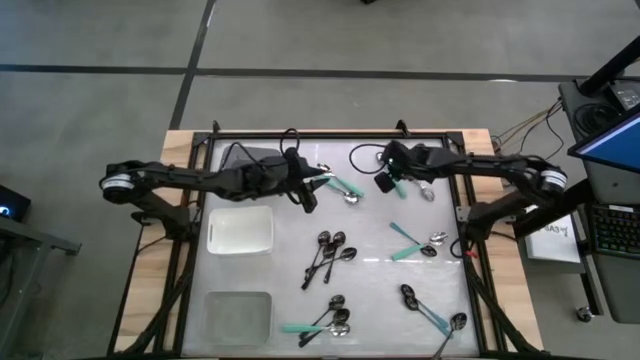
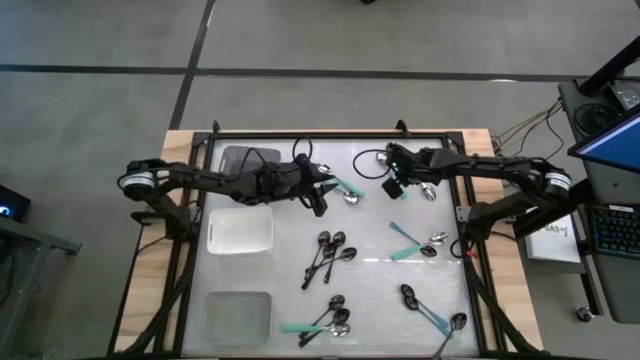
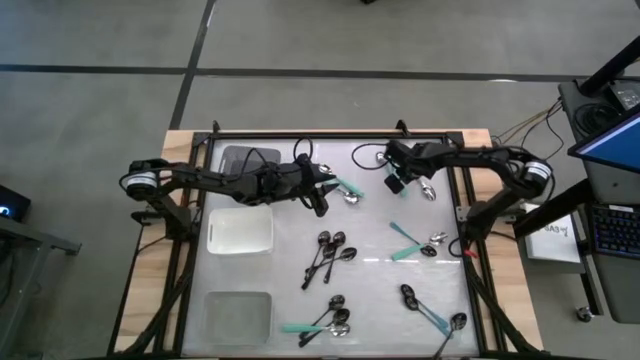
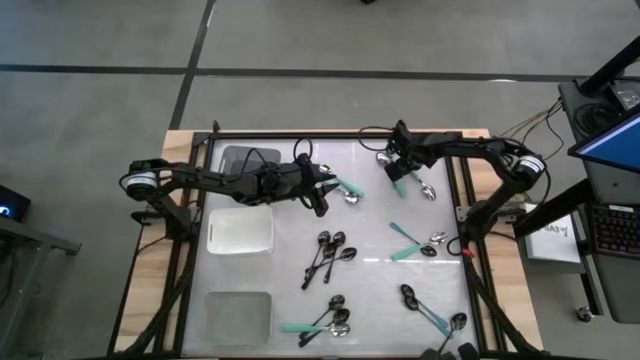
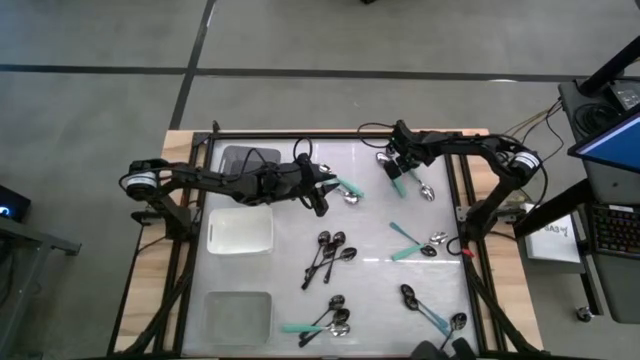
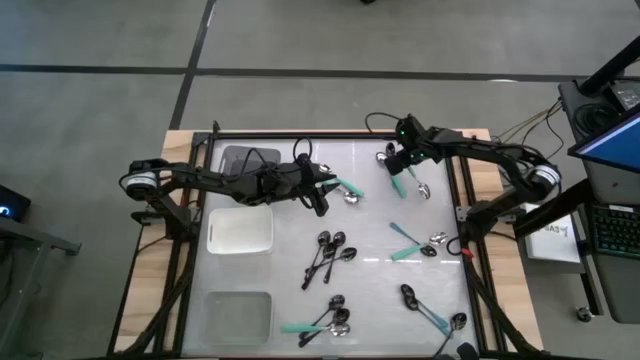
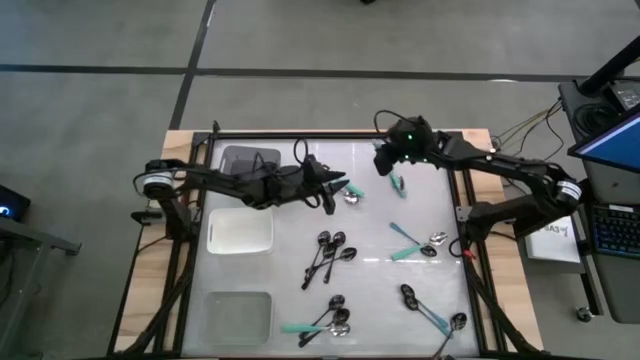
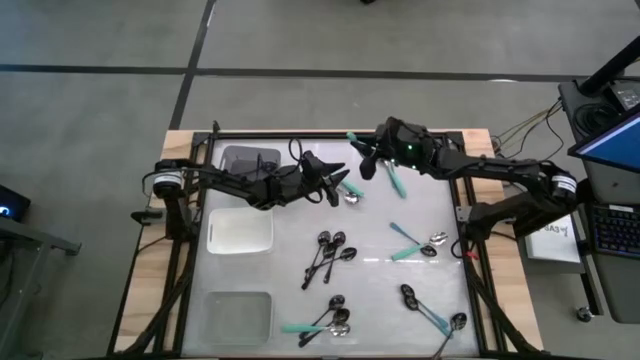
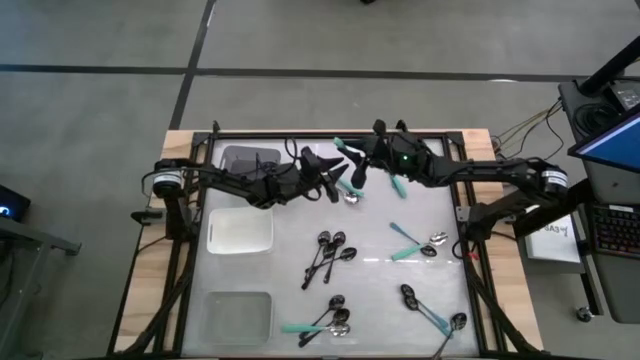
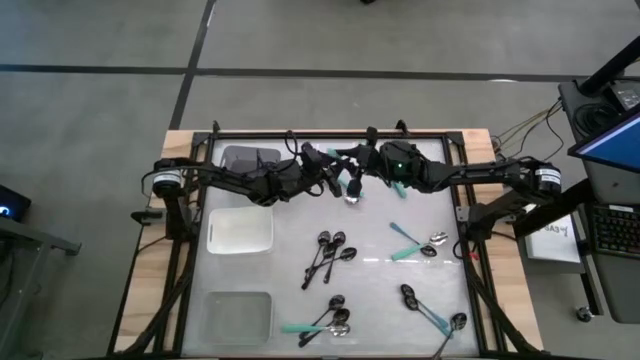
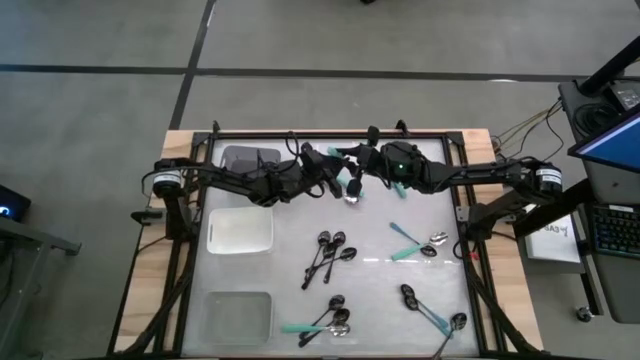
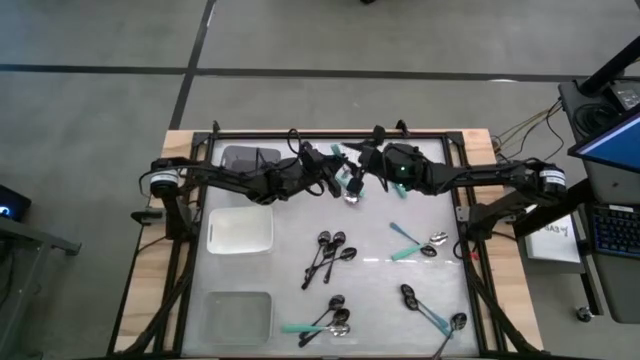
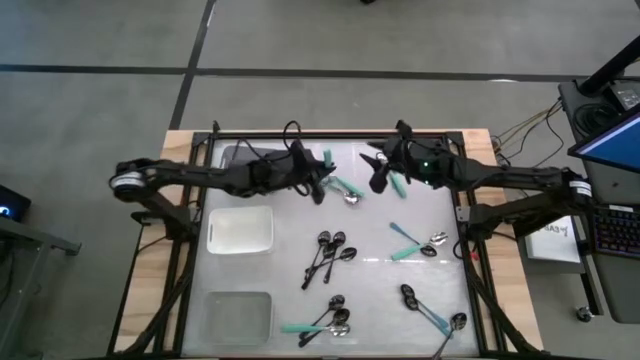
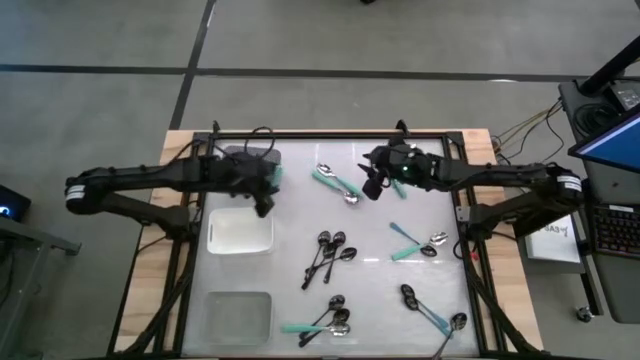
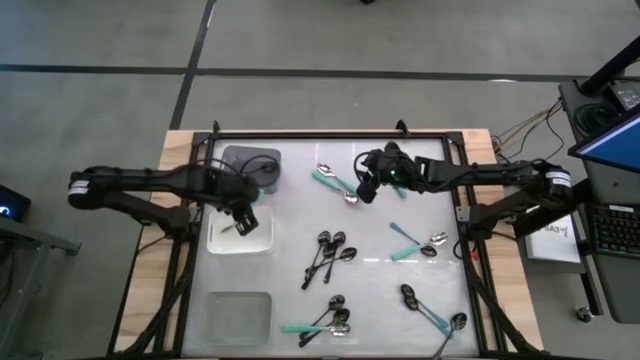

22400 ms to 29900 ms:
Task: Sort silverware by color (type)
Put the light green spoon into the white bin

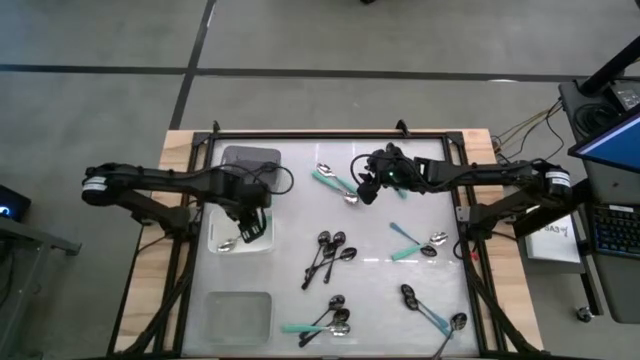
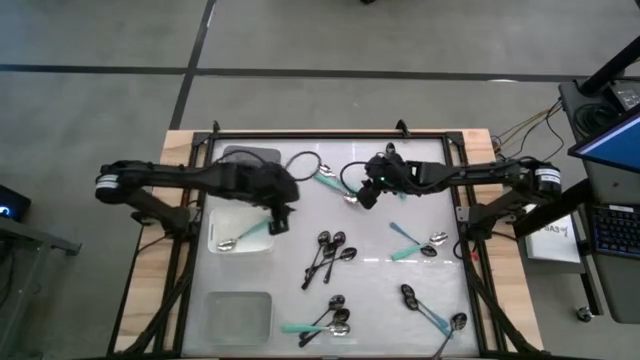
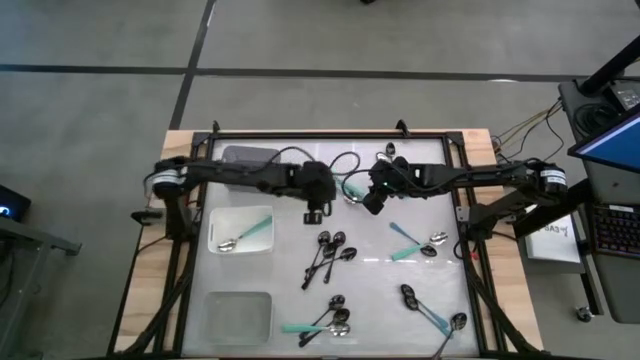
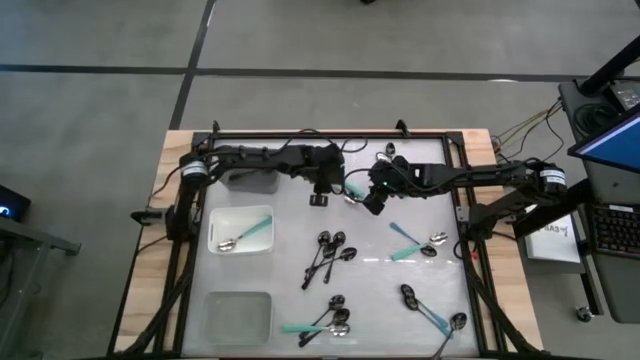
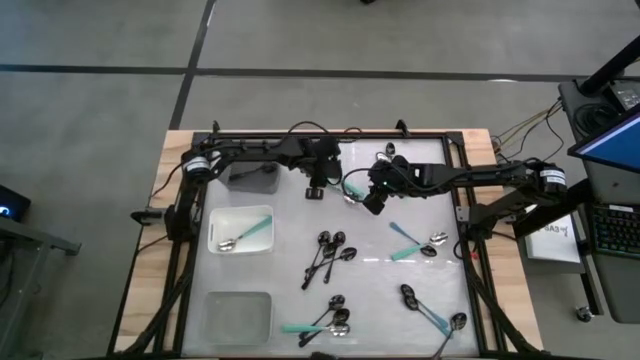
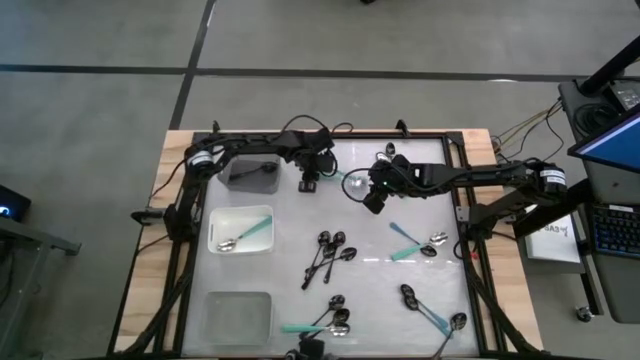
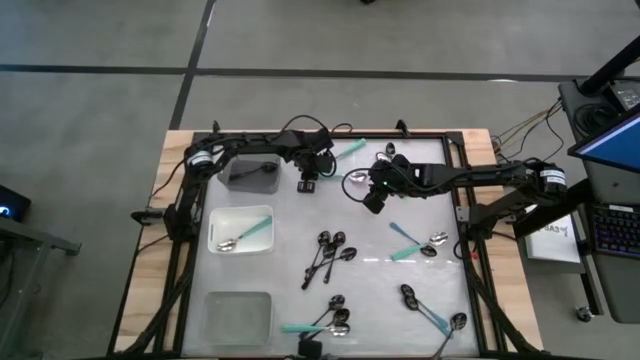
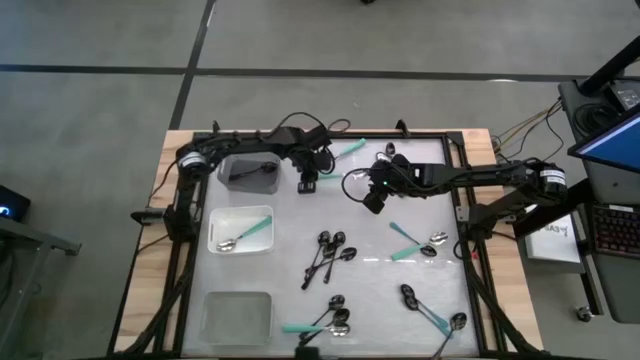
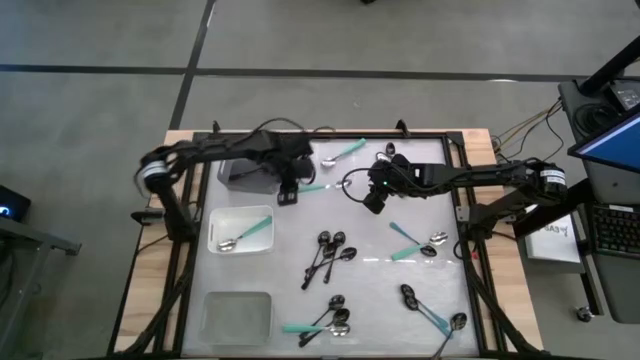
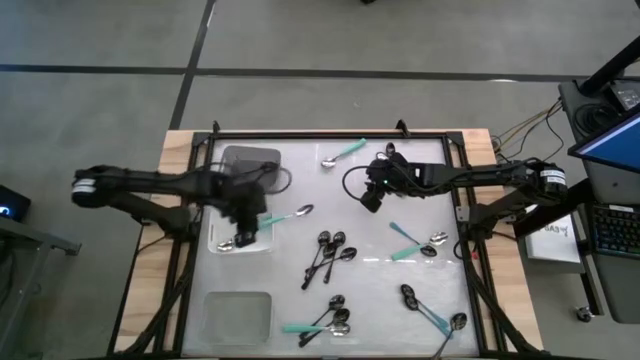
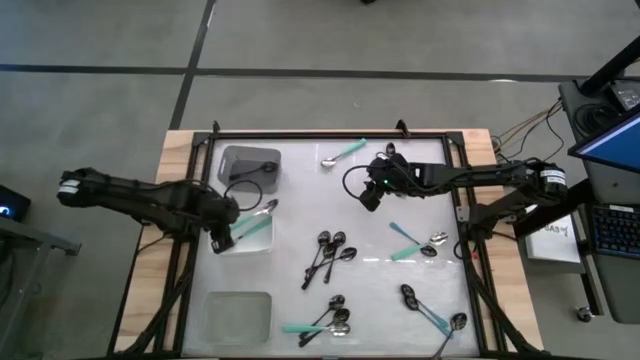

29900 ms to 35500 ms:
Put the light green spoon into the white bin

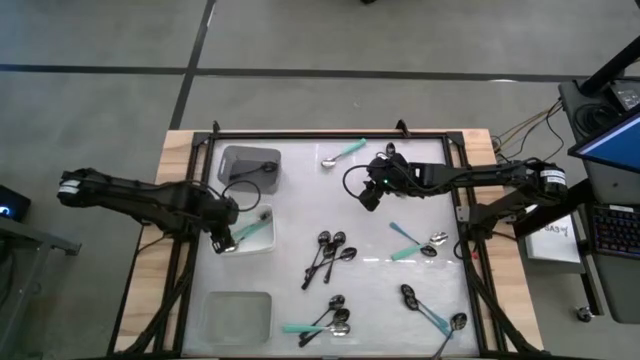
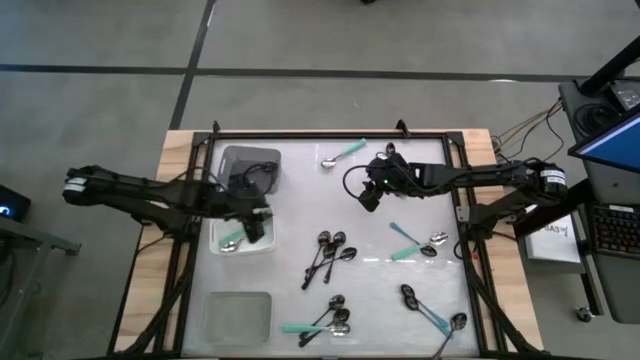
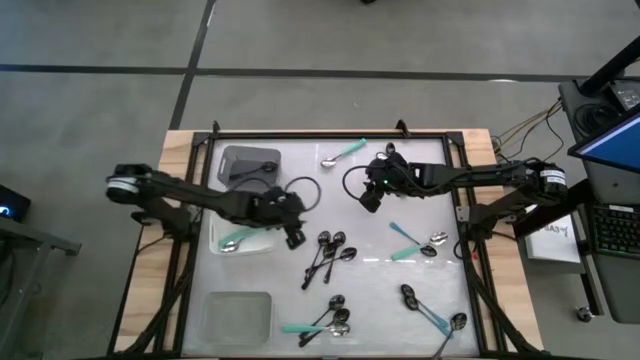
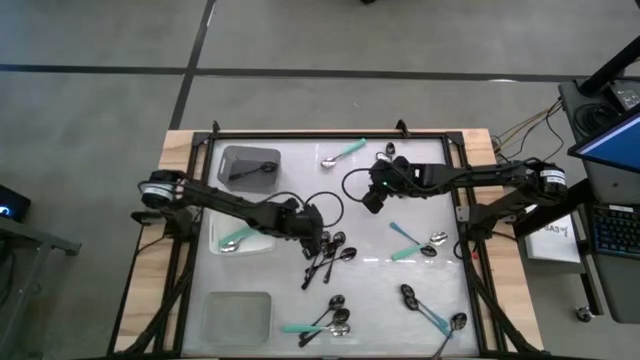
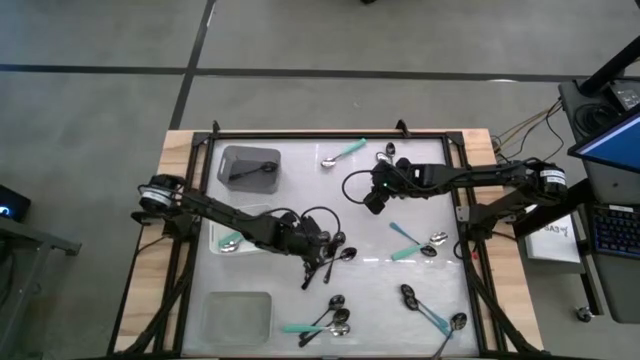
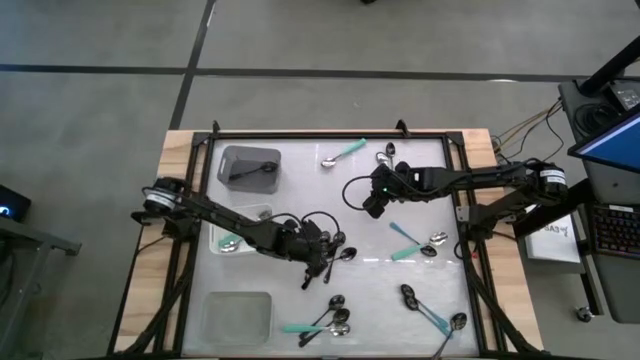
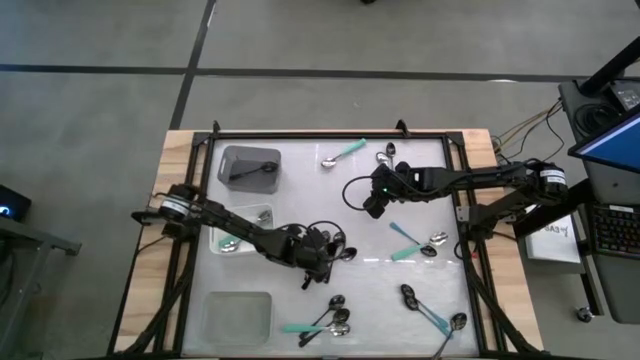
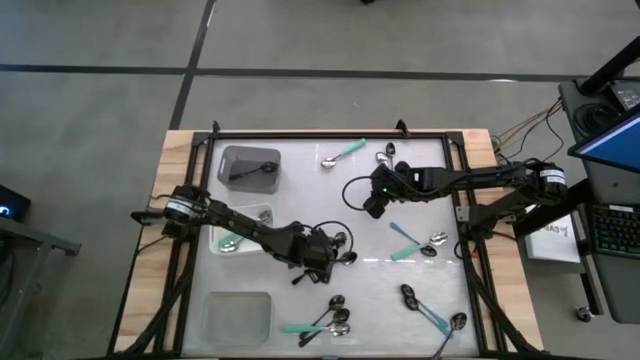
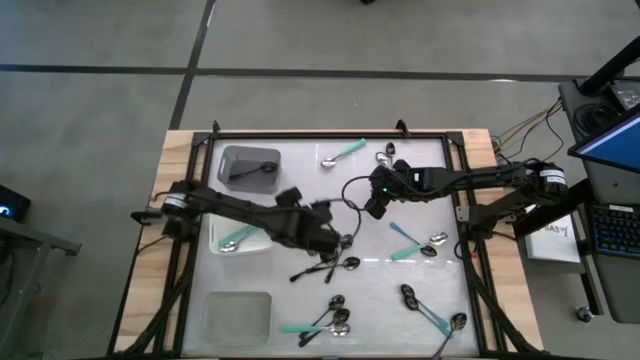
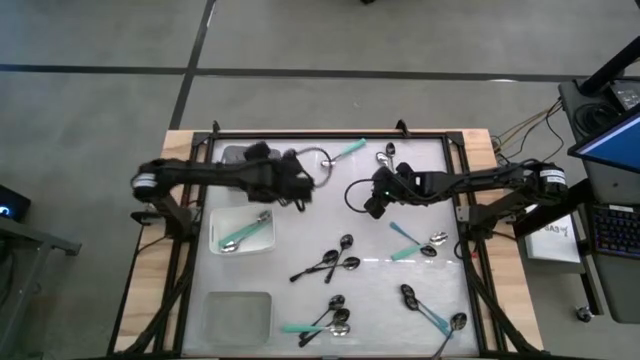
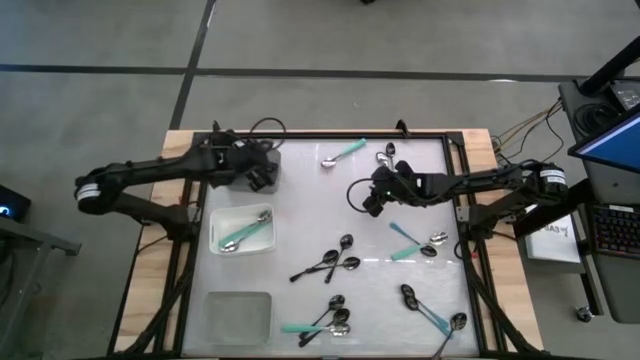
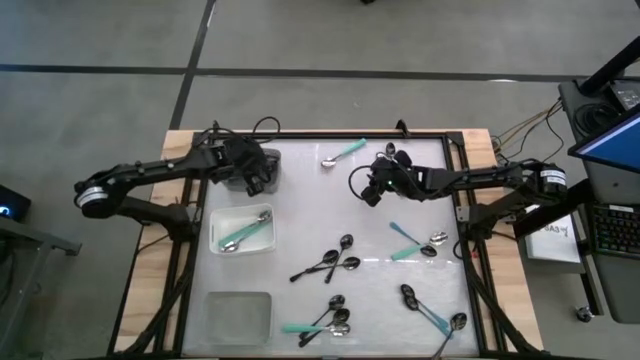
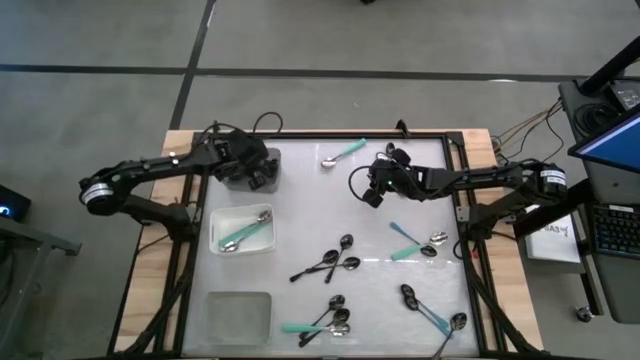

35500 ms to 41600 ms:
Put the black spoon into the black bin

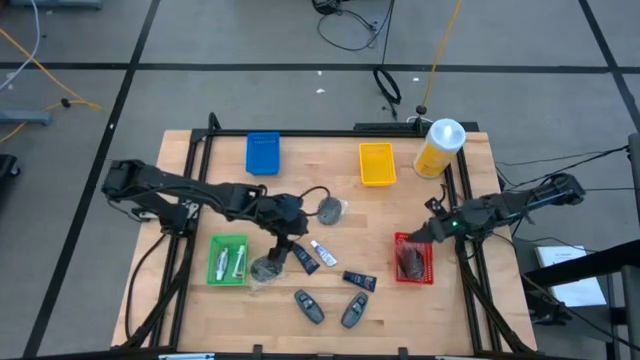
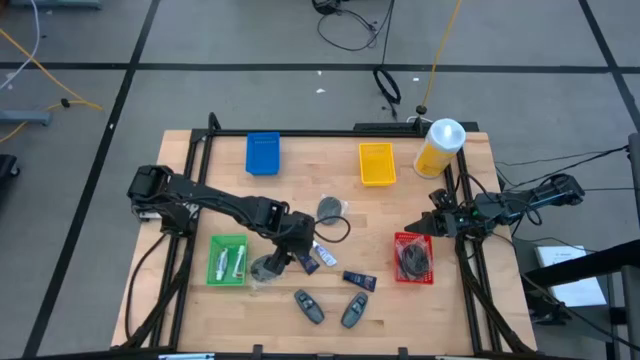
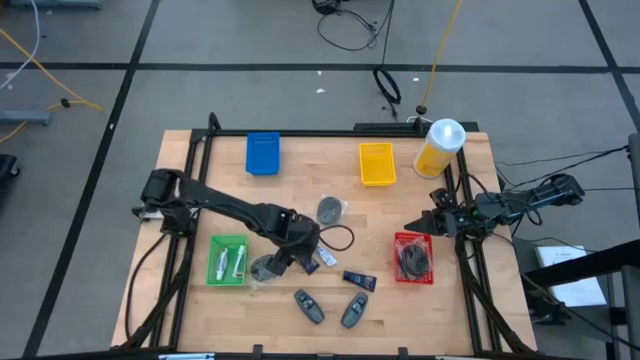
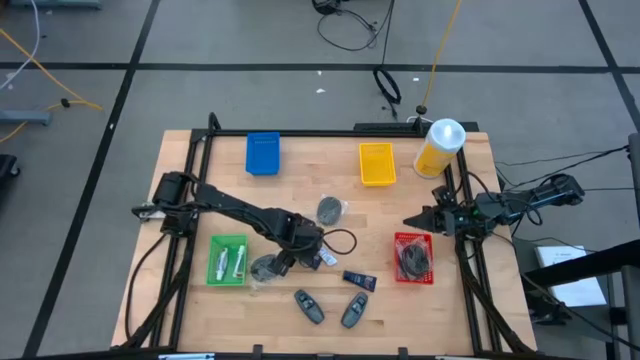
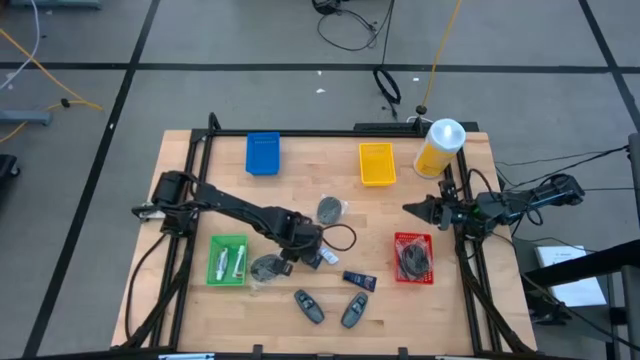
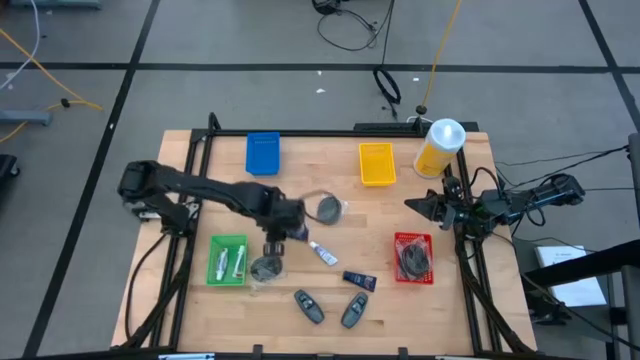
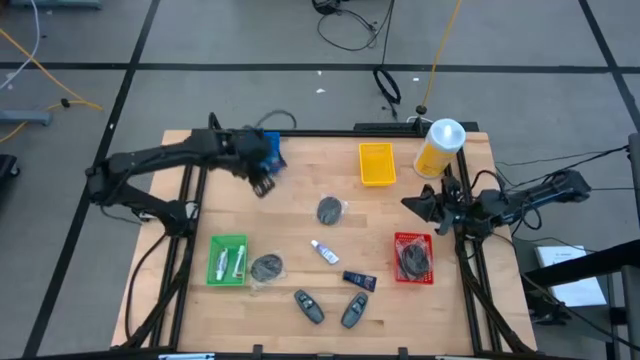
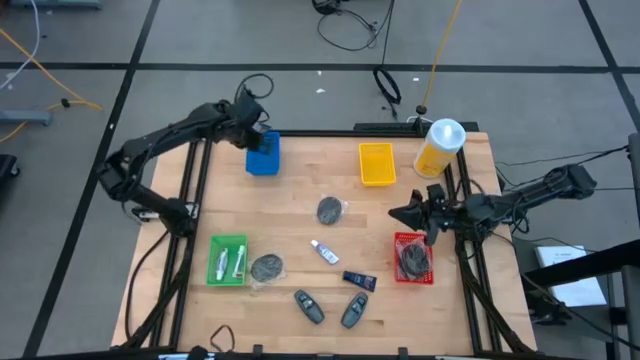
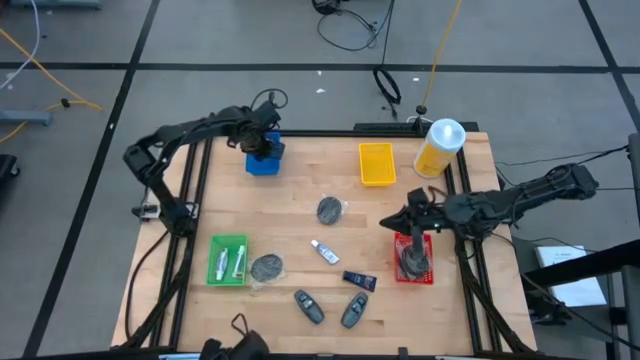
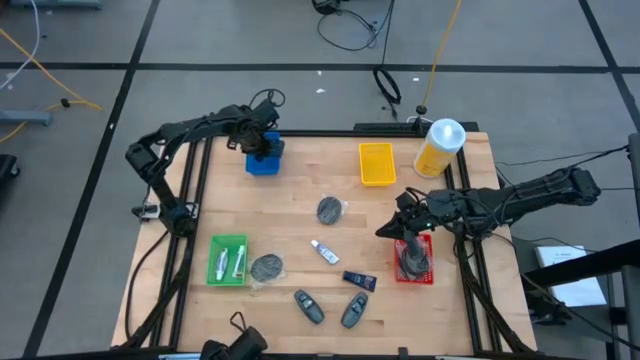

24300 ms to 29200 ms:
Task: Pick & Place Travel size toiletries
Put the dark blue shaving cream into the blue bin
